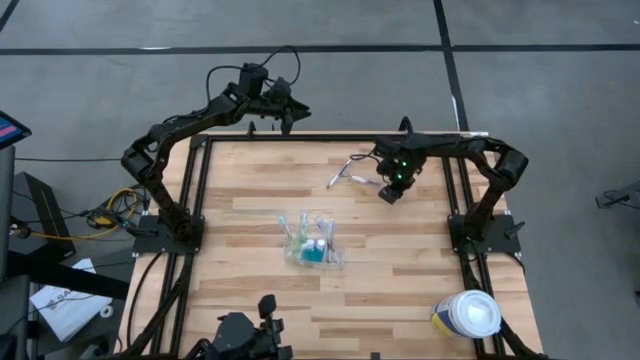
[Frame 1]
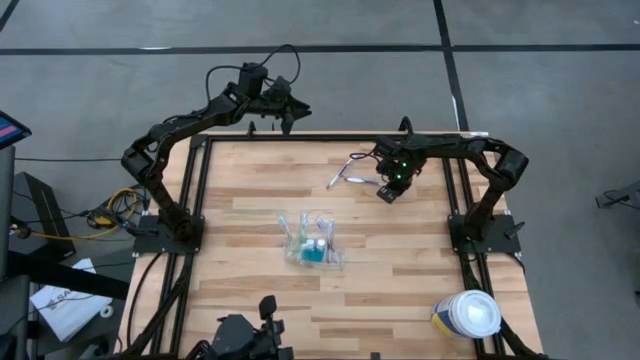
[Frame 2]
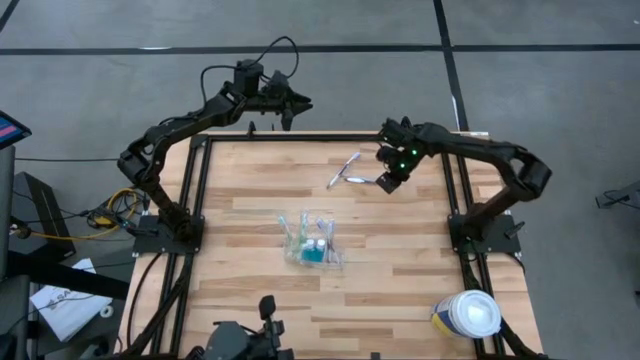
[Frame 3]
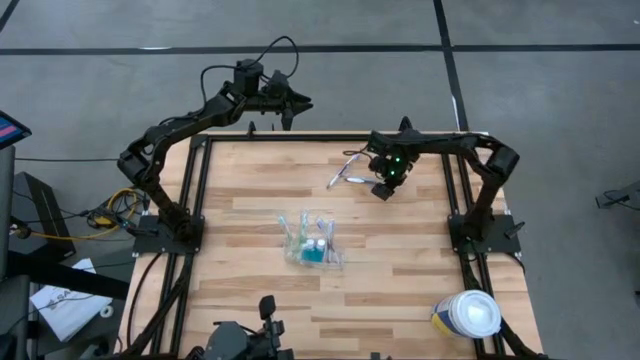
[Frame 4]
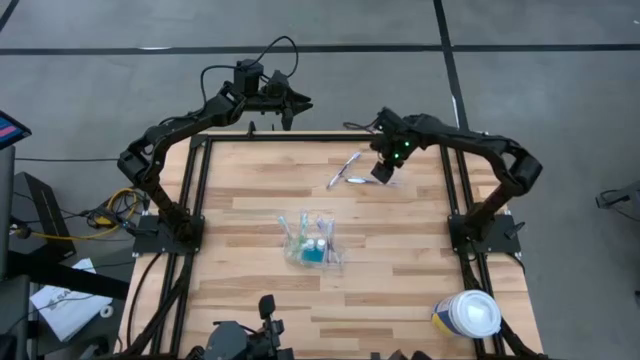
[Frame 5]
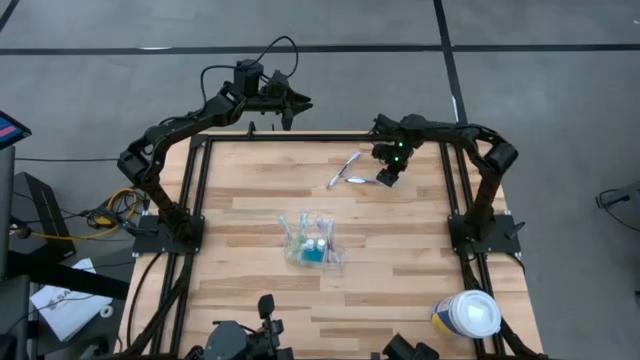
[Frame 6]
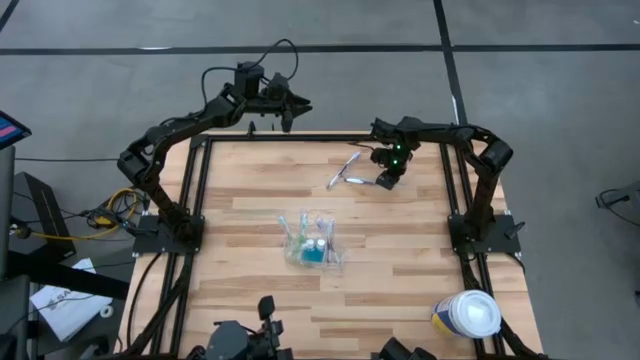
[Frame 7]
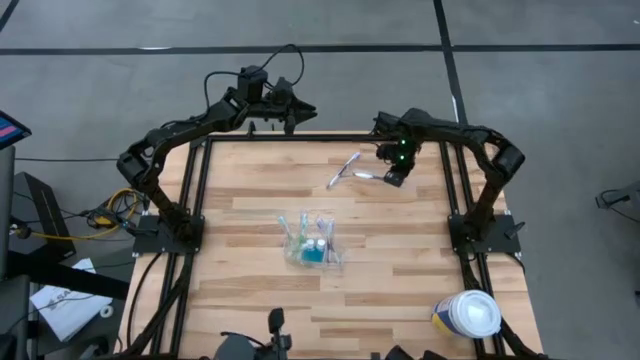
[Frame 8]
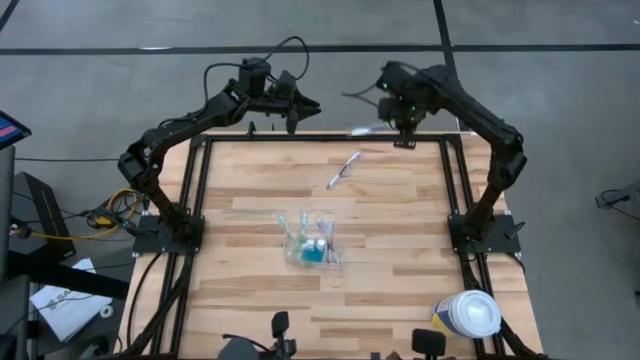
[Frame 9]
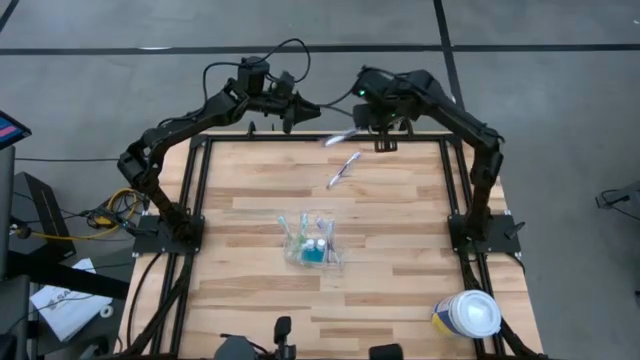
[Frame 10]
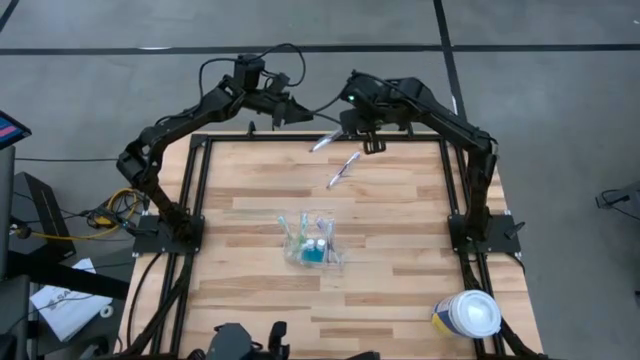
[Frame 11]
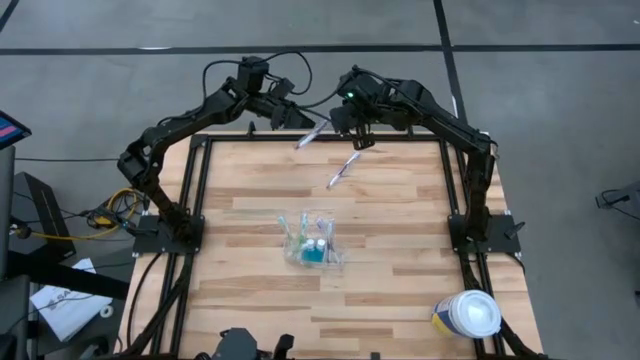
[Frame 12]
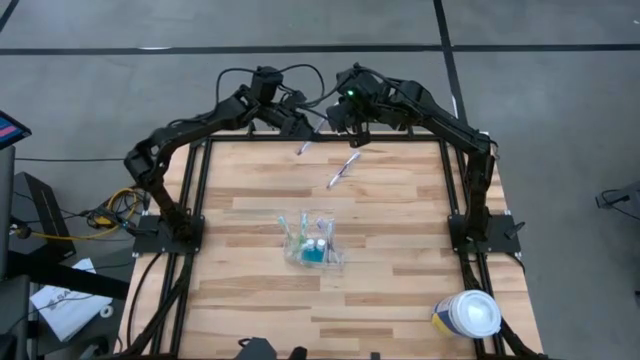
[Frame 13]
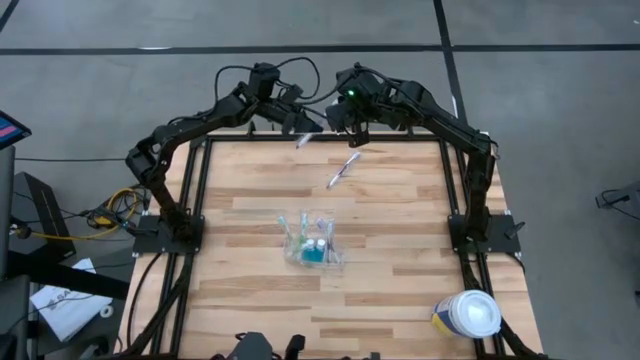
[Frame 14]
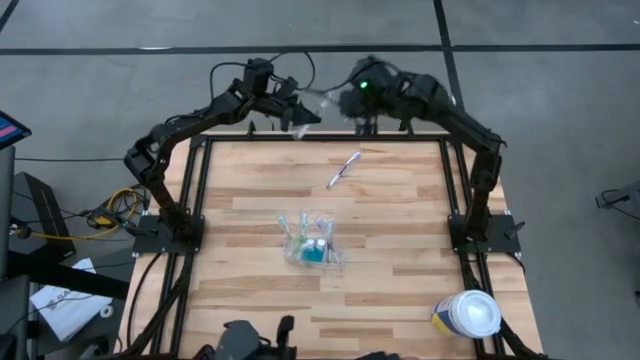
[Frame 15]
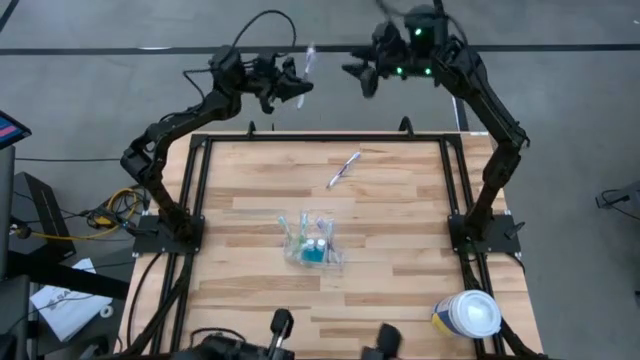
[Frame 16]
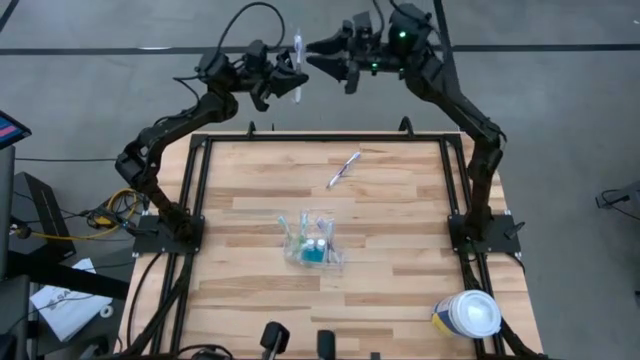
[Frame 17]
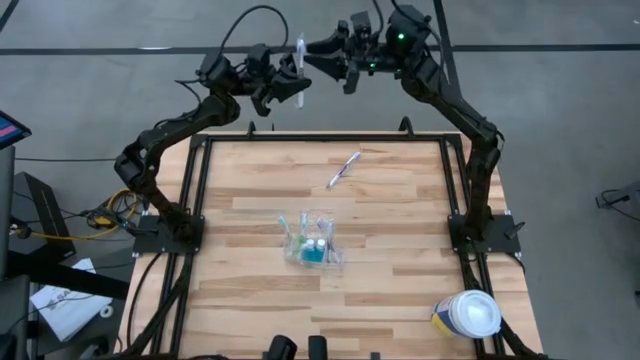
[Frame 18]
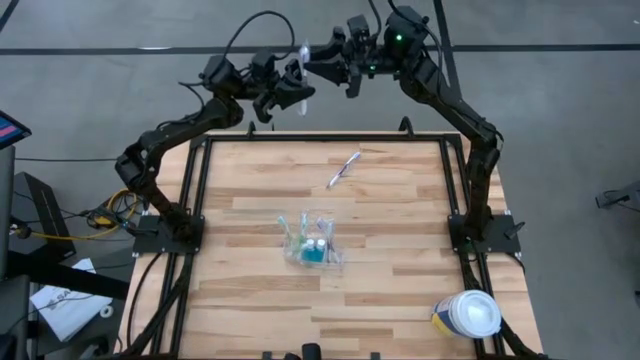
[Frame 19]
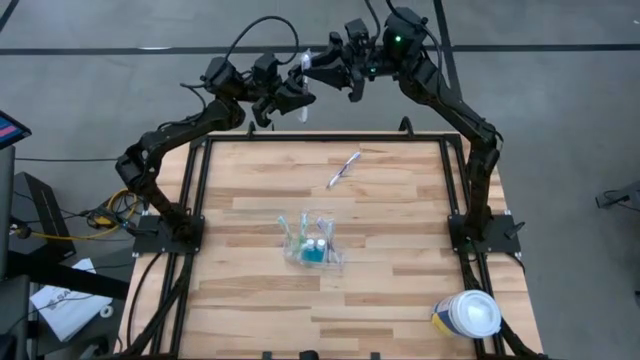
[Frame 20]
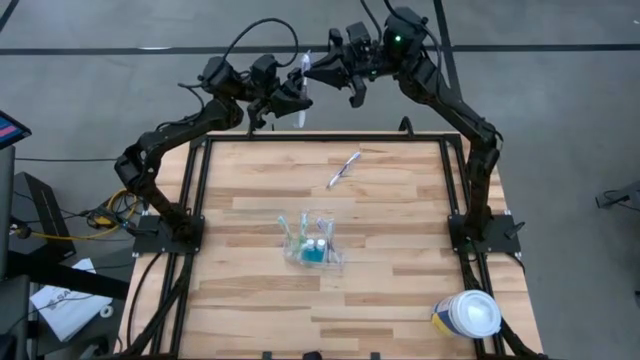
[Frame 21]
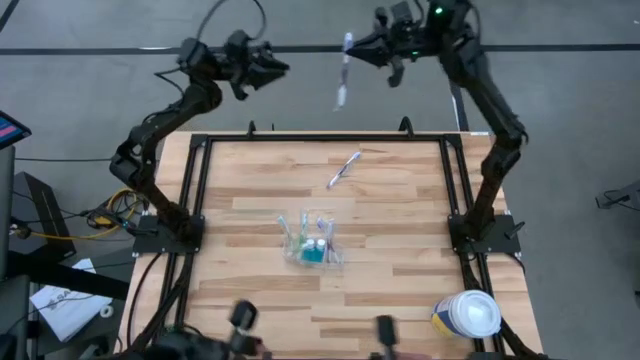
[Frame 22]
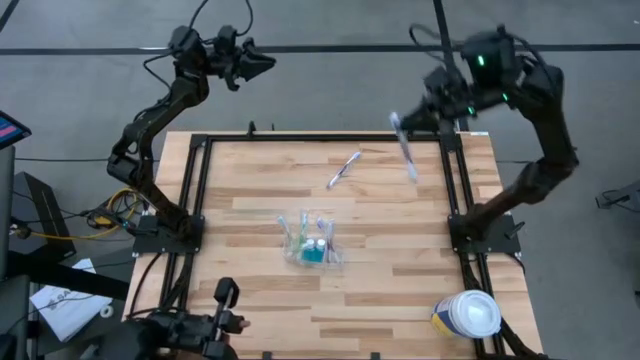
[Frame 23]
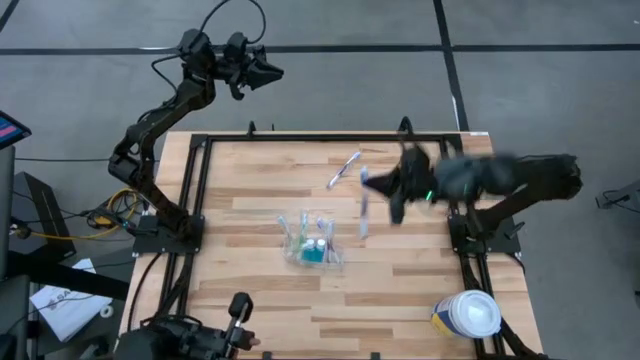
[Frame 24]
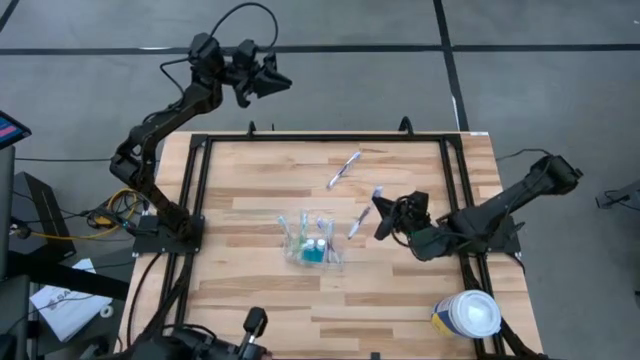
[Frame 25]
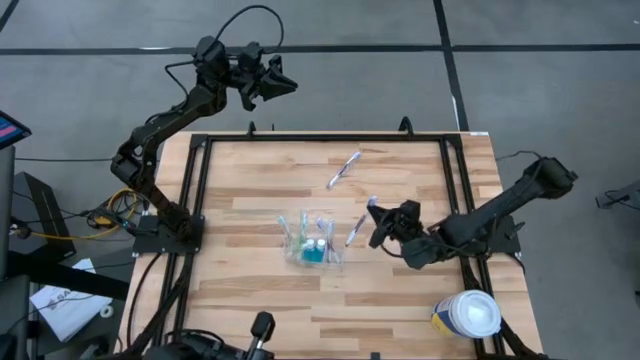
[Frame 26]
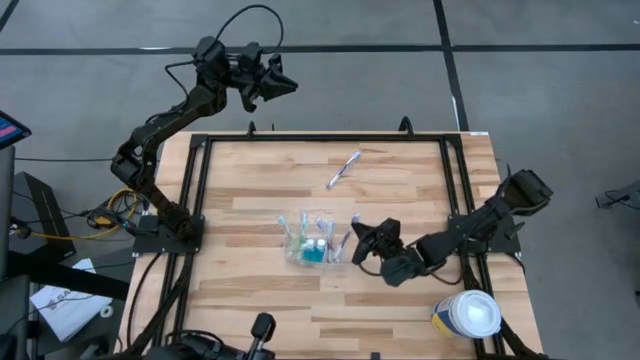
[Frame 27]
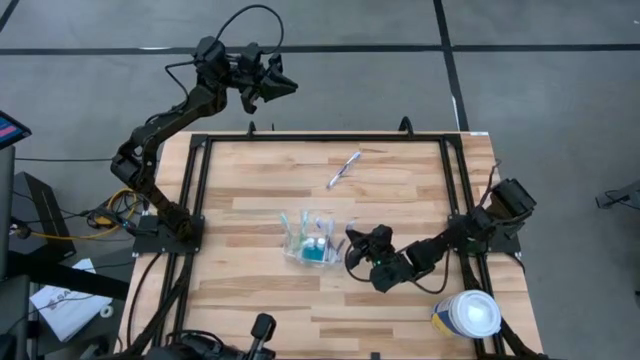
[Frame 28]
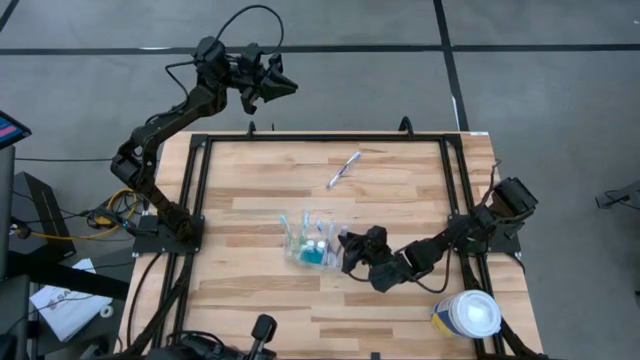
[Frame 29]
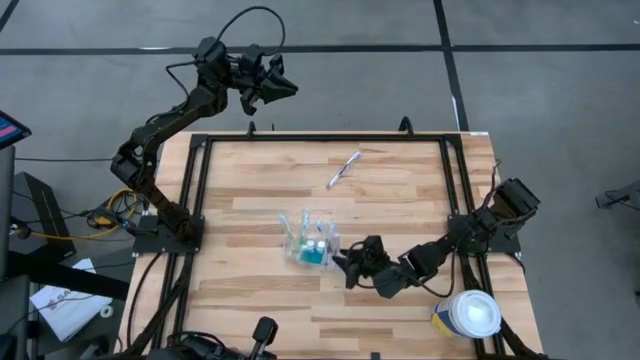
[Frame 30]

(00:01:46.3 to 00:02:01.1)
Task: Pick & Place toothbrushing station
Put the purple toothbrush into the transparent organizer

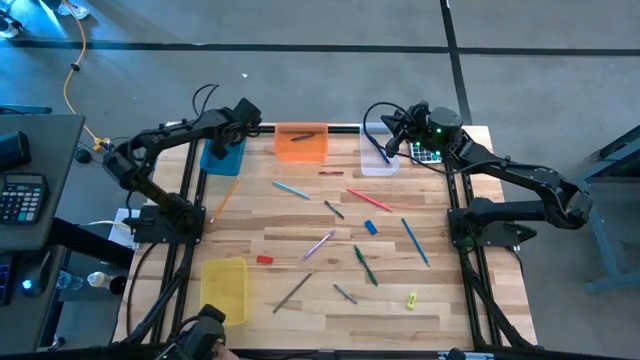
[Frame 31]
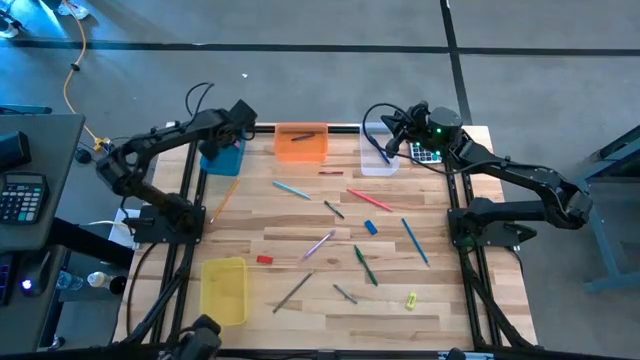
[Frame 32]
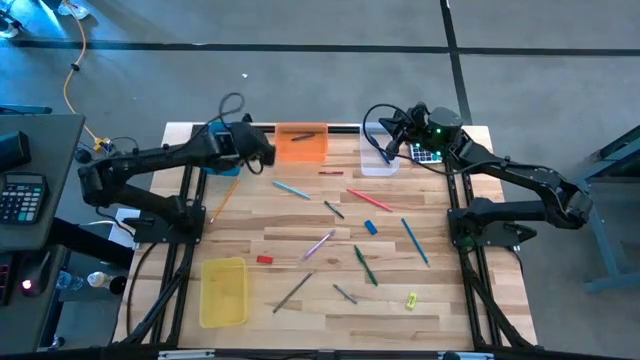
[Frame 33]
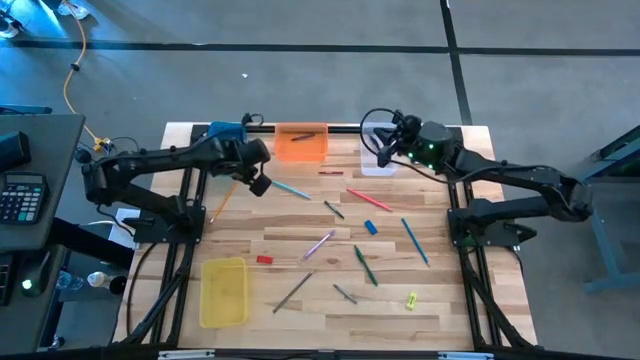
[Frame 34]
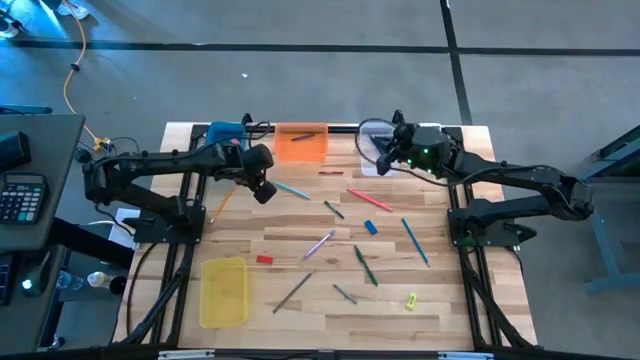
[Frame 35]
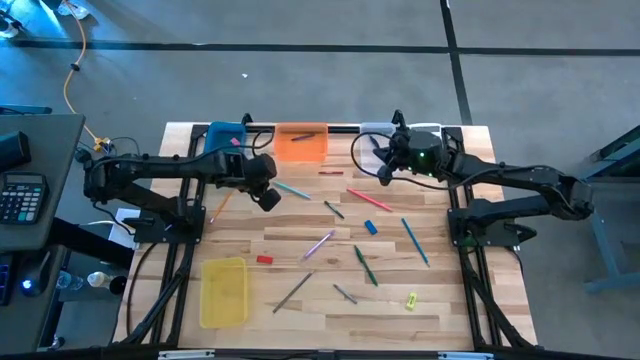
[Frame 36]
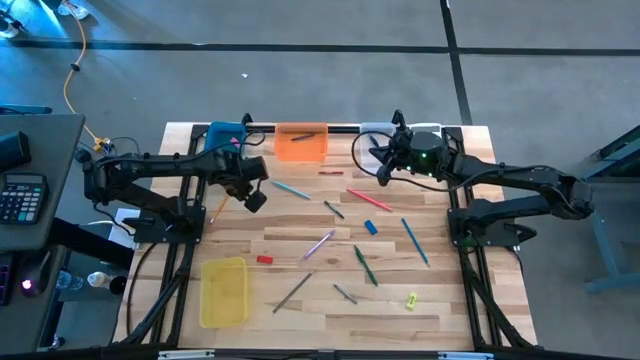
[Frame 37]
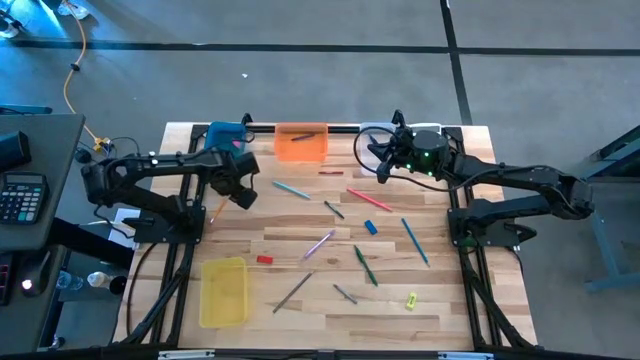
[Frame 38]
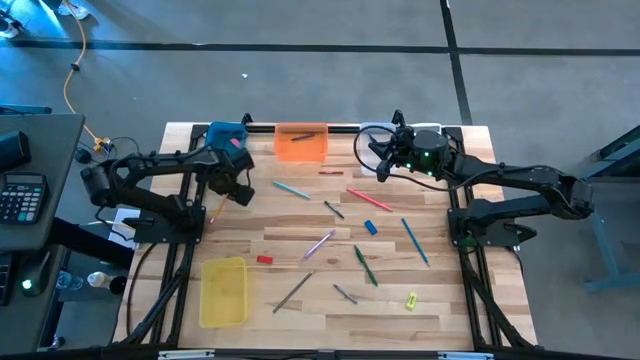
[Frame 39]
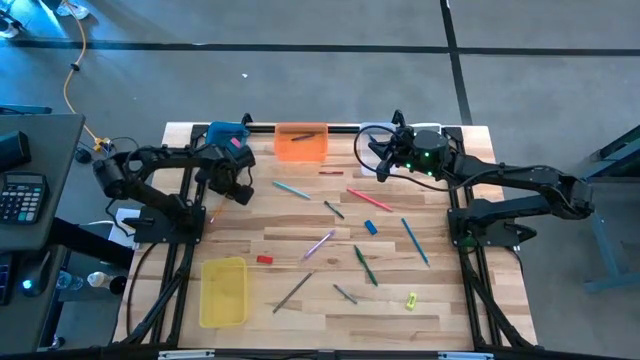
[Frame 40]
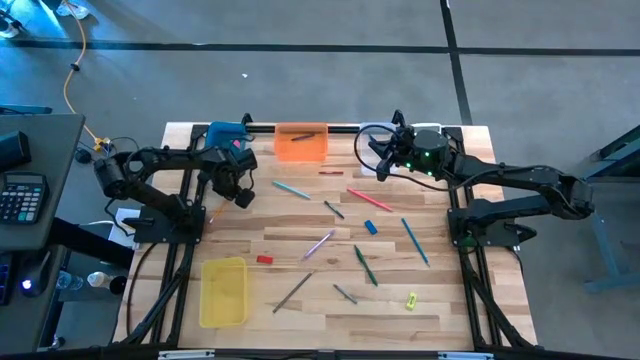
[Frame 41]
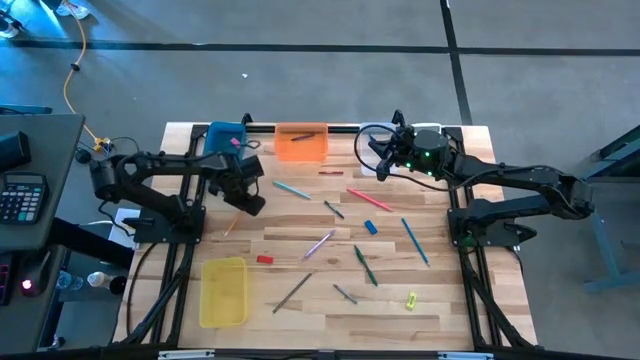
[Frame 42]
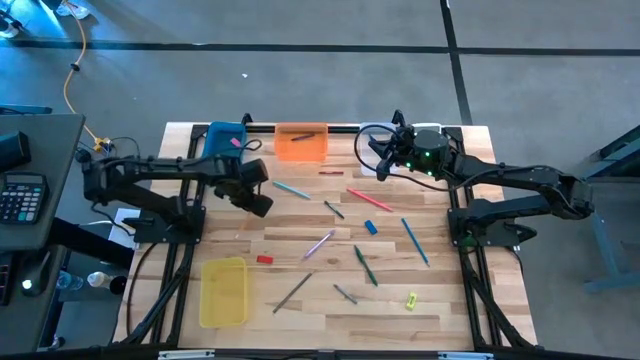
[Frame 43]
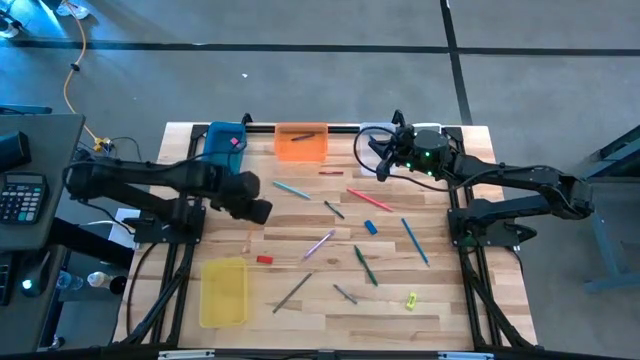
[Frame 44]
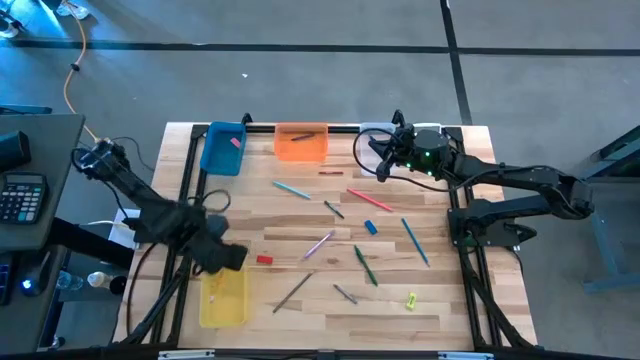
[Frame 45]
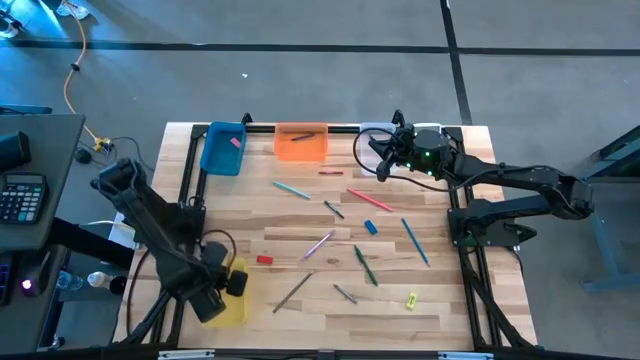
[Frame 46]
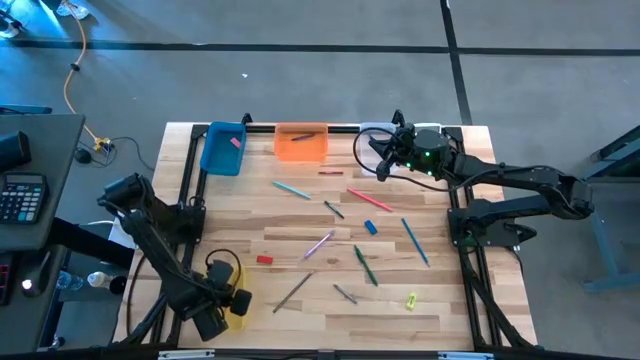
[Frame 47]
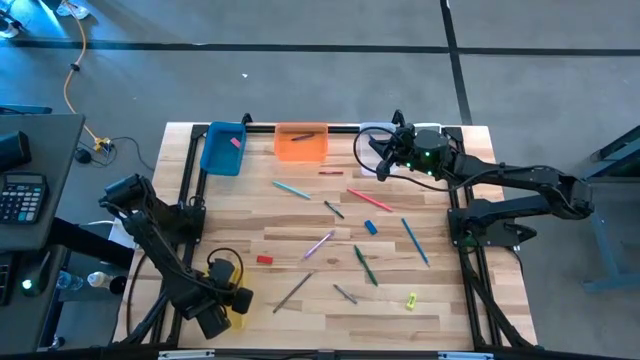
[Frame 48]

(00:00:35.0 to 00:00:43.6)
Task: Sort crayons/erasers/pens/pencils in bins
Put the yellow pencil into the yellow bin
